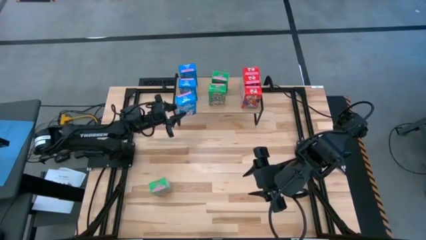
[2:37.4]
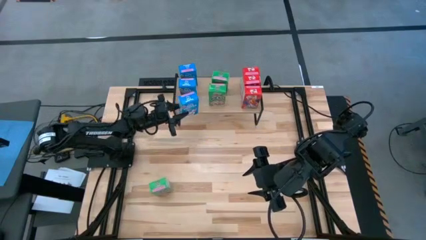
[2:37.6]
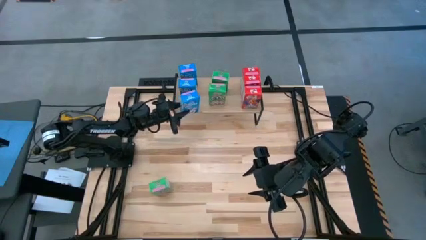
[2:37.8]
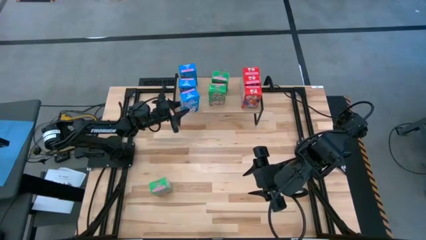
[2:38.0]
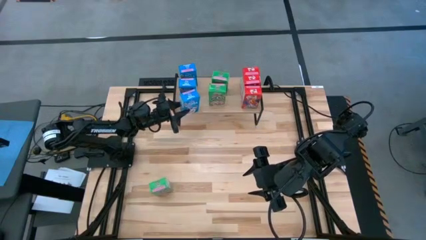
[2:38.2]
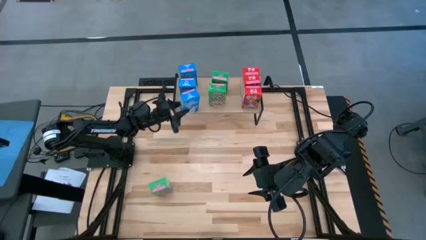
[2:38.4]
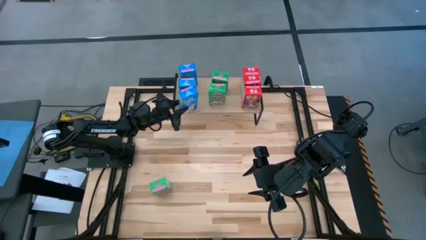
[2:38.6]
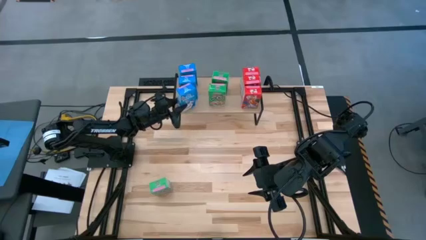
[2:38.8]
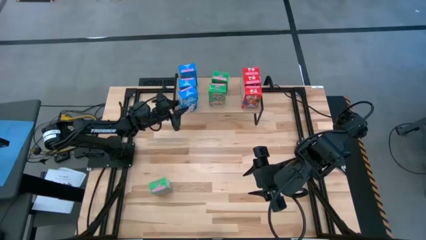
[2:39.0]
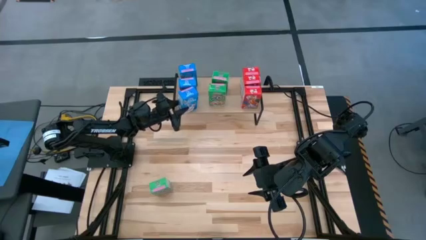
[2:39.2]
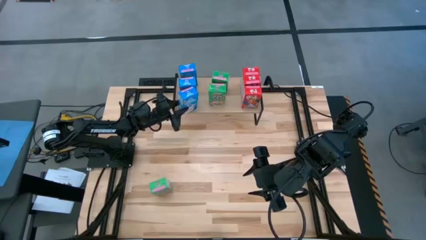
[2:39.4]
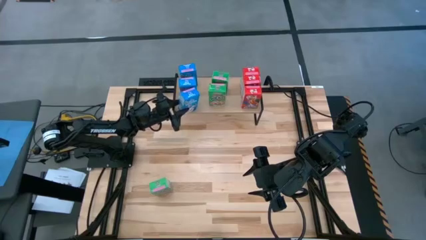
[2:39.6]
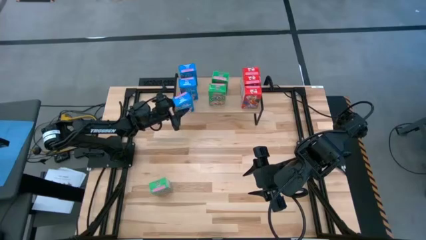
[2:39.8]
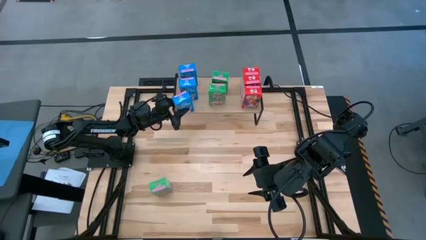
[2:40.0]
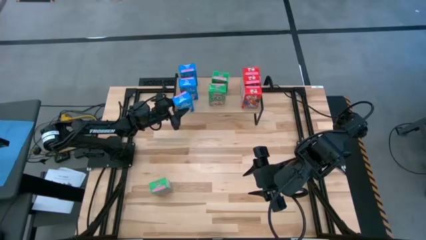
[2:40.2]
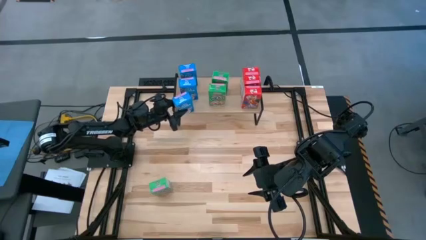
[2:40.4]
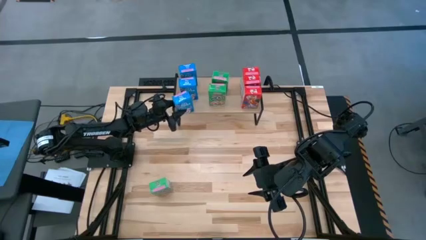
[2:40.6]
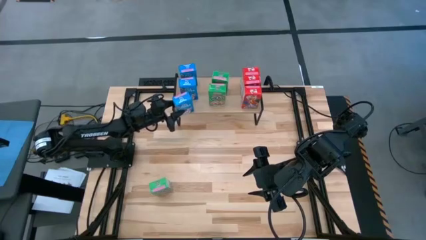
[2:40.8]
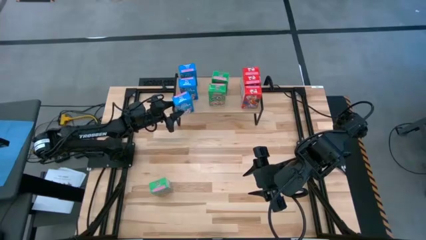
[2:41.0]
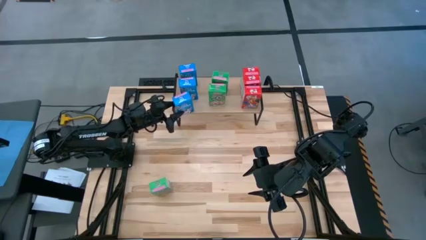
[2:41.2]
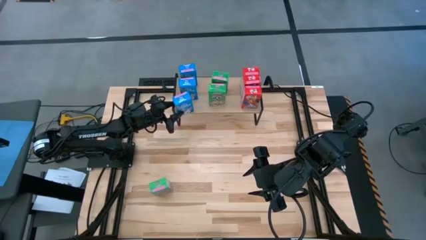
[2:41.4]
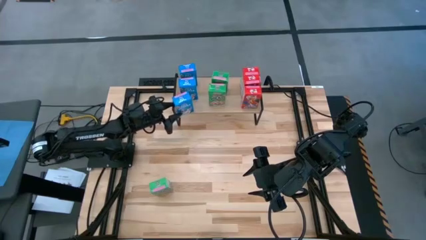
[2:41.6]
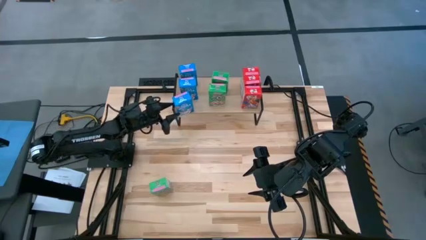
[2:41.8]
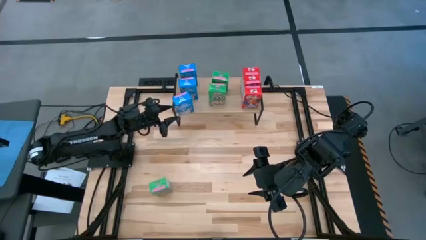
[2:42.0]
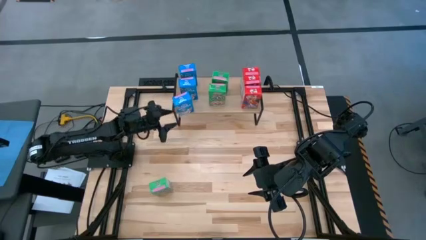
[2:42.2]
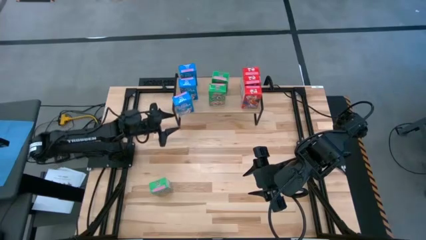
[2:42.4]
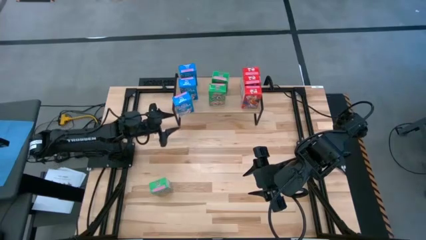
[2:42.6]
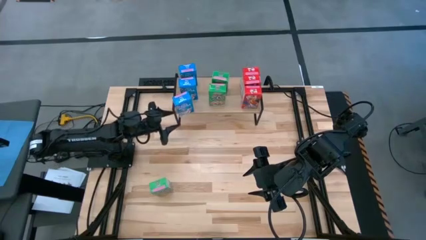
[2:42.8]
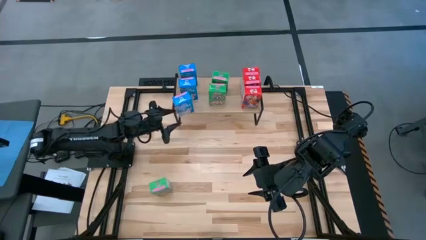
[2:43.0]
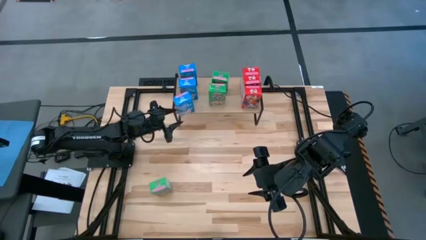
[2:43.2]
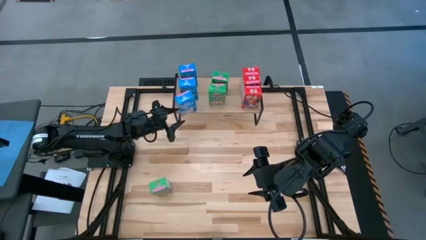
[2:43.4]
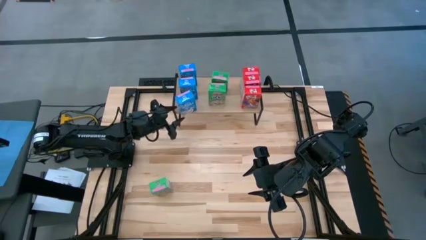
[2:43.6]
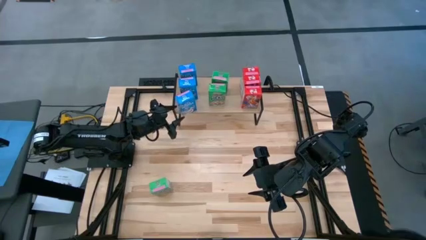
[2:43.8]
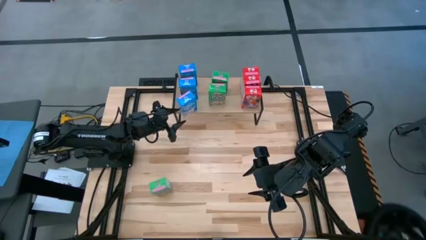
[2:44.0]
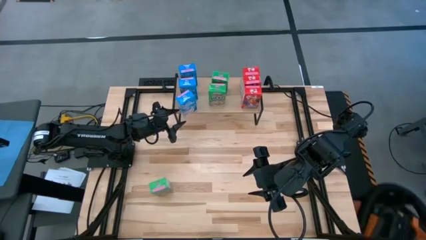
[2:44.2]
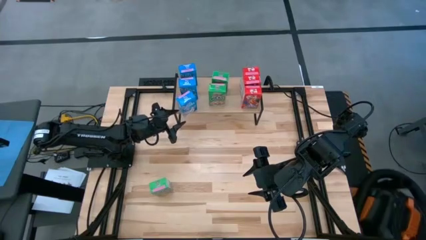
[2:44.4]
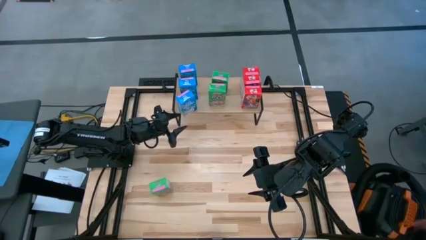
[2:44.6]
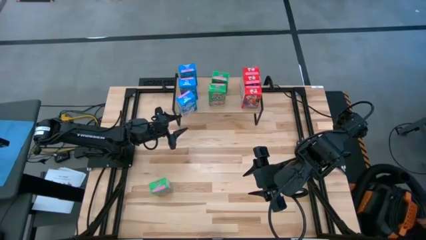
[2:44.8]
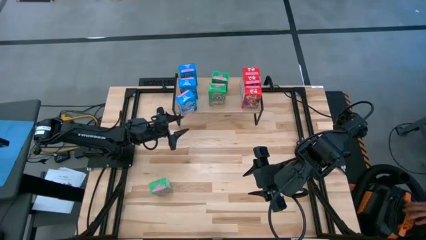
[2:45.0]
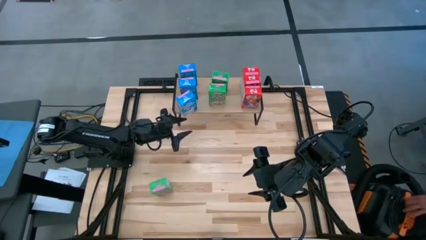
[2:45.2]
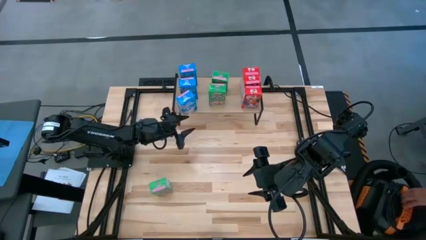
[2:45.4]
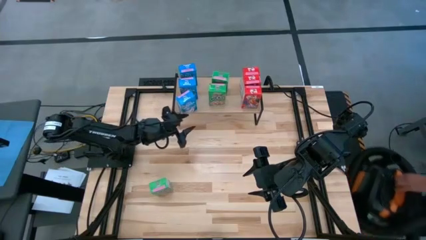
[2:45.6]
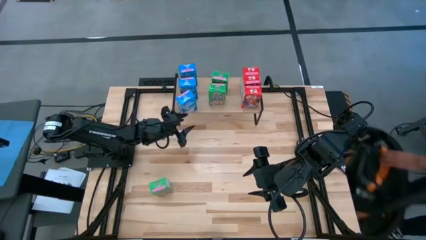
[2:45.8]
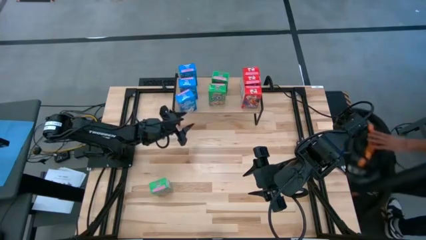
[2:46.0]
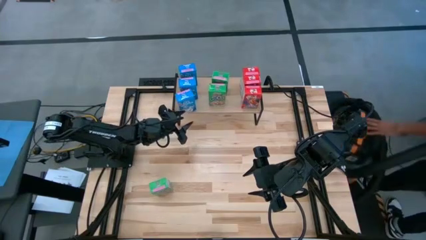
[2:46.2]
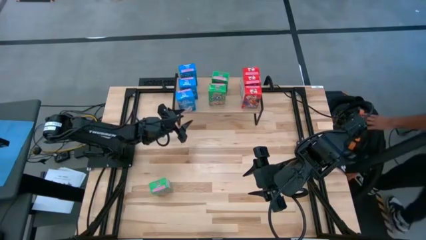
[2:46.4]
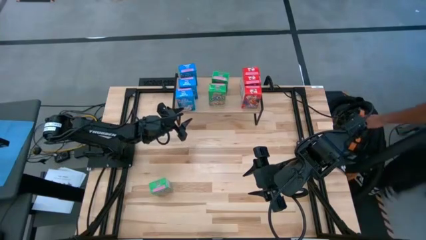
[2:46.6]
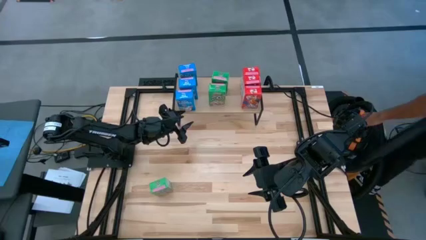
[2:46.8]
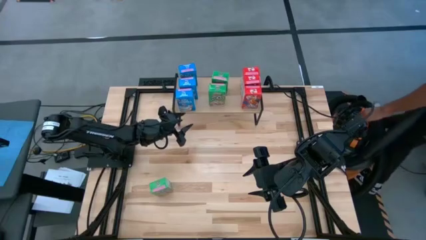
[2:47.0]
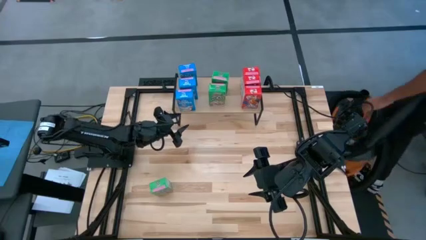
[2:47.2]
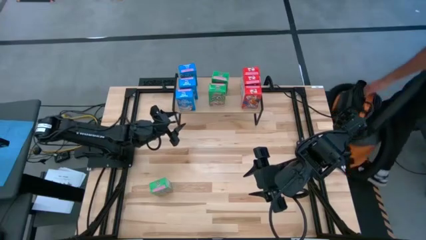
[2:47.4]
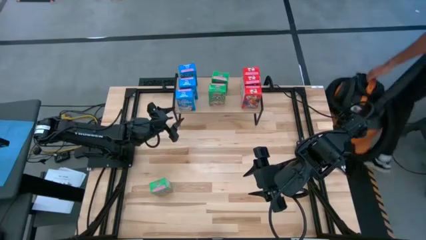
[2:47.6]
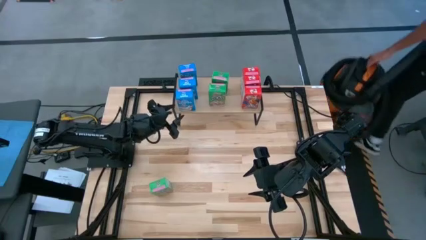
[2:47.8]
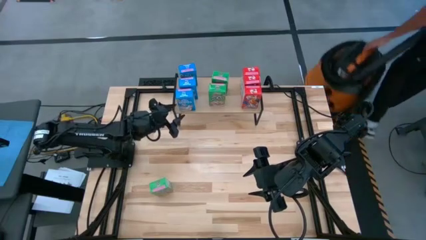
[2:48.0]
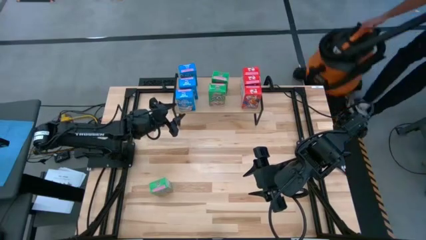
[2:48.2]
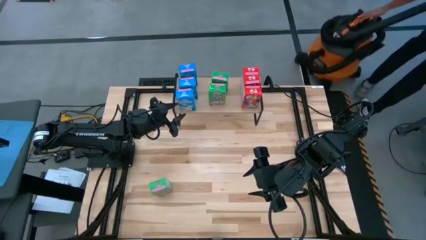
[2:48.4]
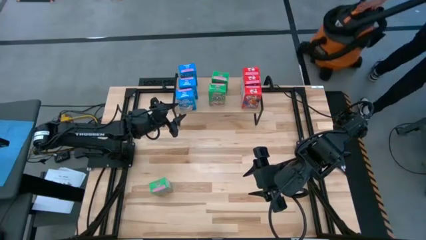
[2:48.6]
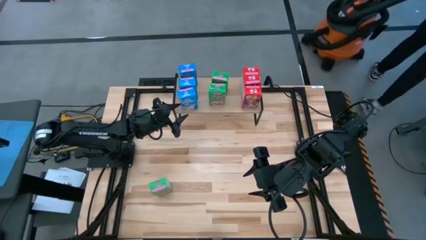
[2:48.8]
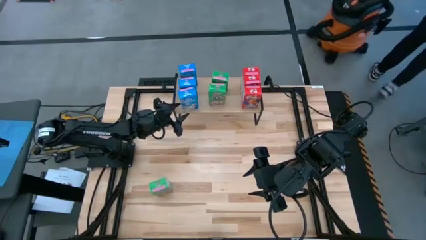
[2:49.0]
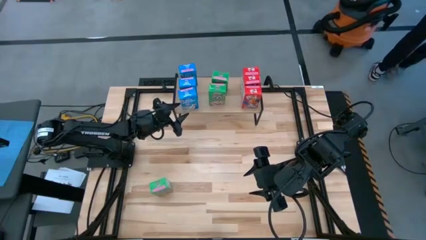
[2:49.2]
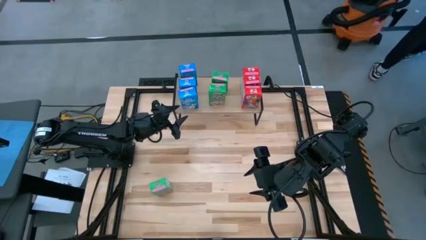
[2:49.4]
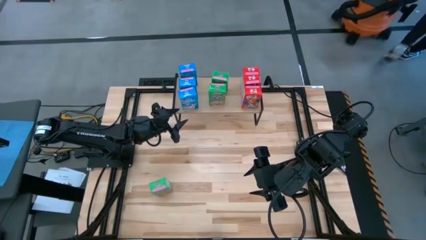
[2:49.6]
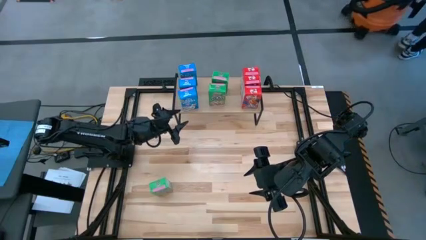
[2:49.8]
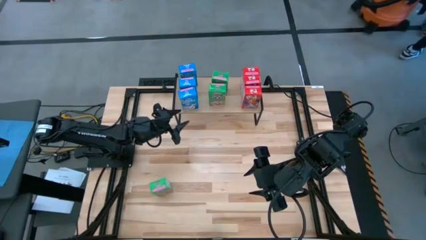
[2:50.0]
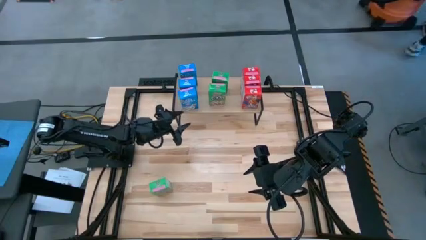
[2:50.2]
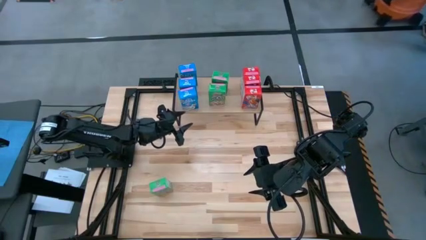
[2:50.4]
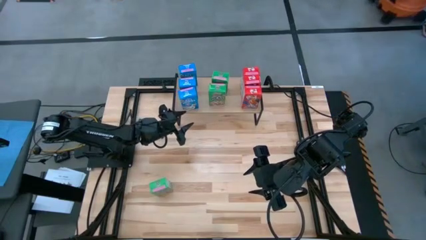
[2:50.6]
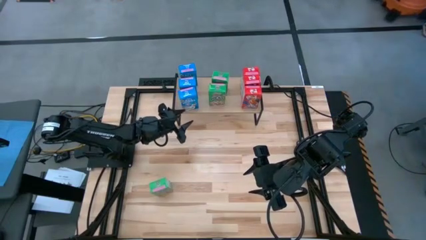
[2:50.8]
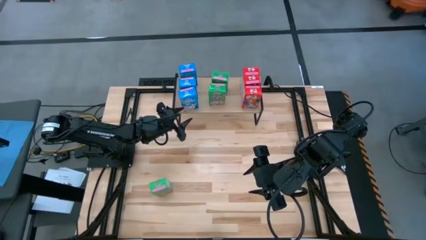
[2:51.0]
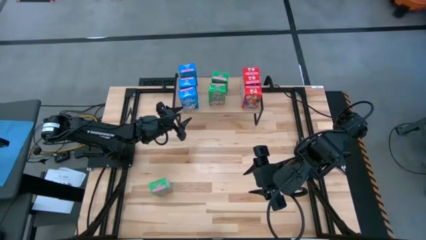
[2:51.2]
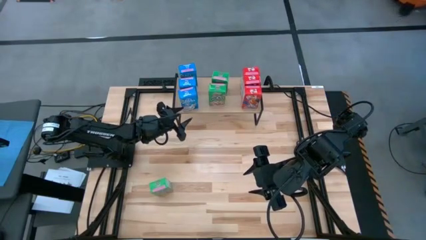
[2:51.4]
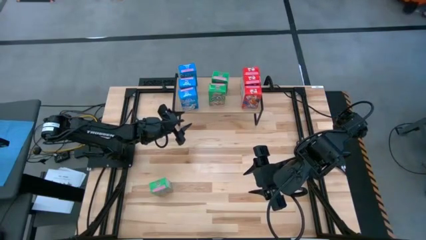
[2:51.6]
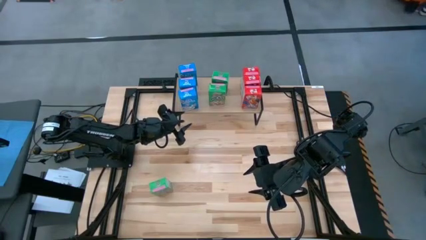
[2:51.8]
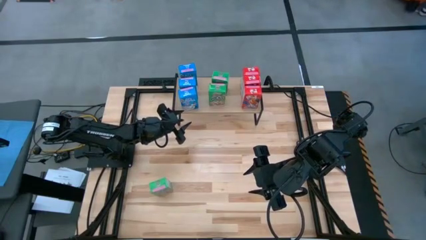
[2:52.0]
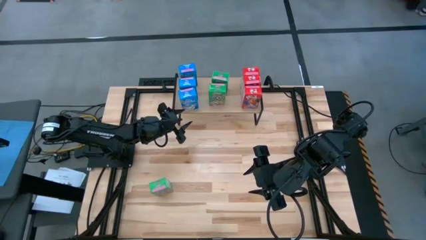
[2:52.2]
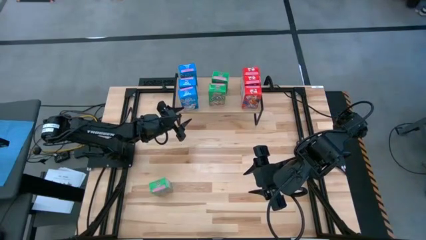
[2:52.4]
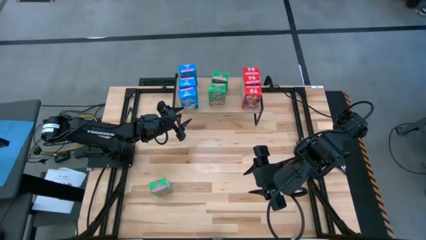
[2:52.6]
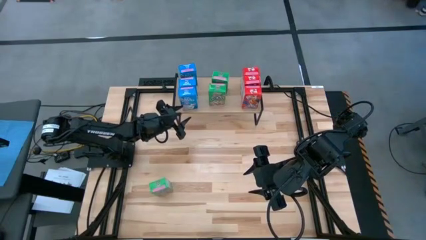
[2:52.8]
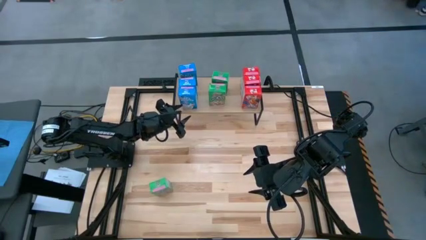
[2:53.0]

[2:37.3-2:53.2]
Task: Stack cereal on shelf
Put the blue cereal box on the shelf aligned with the other blue cereal boxes
